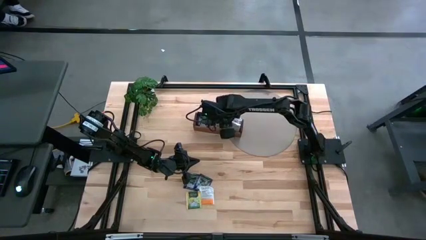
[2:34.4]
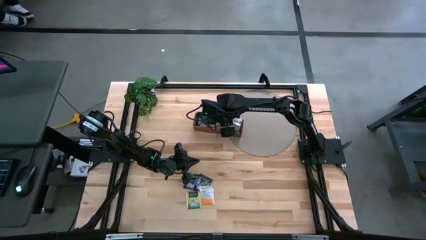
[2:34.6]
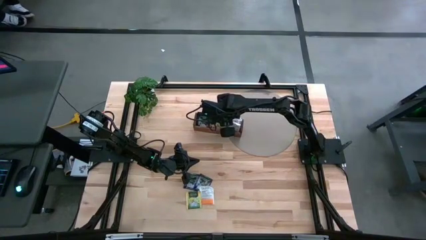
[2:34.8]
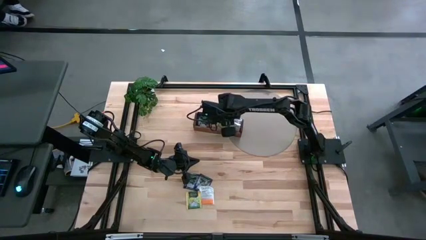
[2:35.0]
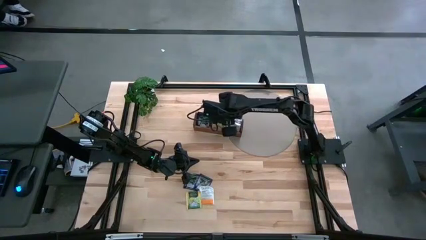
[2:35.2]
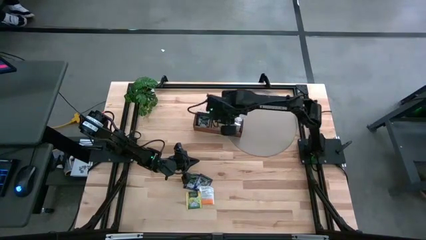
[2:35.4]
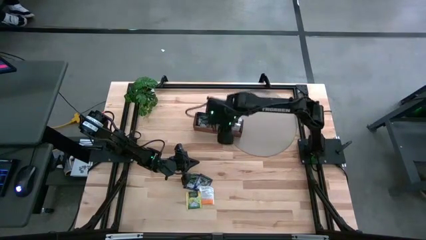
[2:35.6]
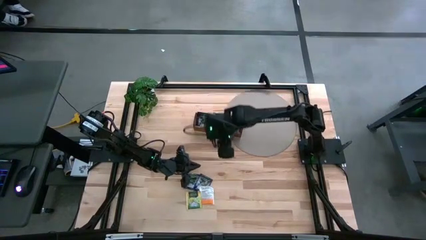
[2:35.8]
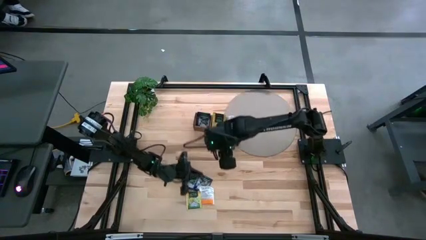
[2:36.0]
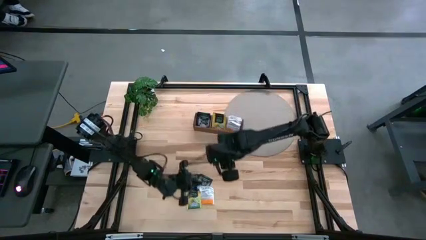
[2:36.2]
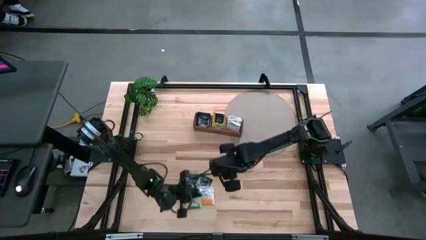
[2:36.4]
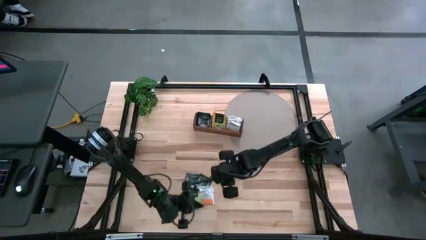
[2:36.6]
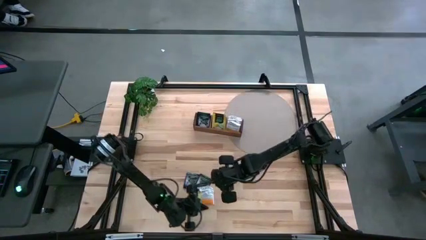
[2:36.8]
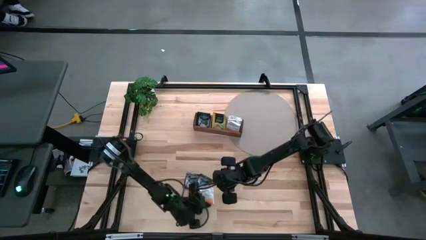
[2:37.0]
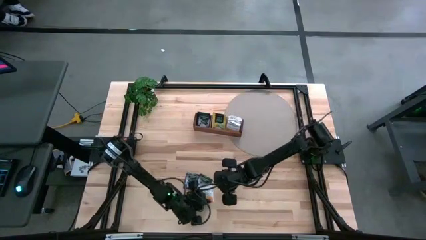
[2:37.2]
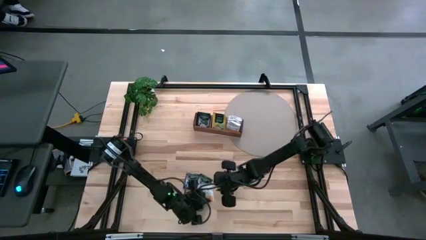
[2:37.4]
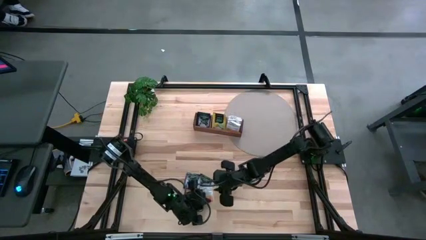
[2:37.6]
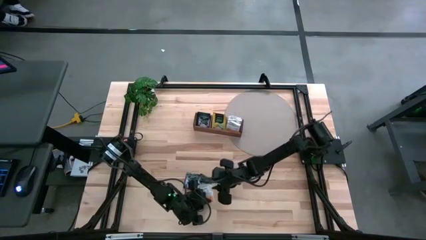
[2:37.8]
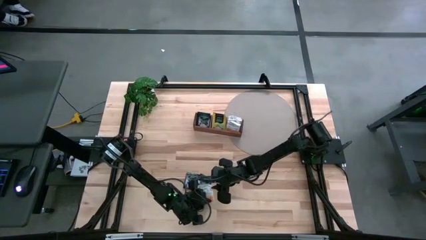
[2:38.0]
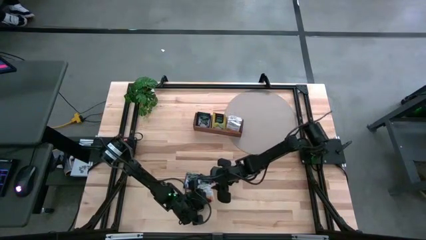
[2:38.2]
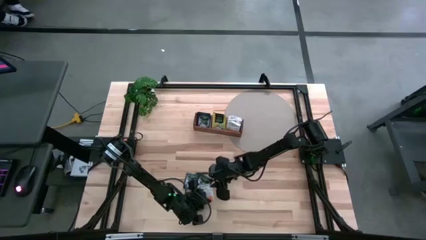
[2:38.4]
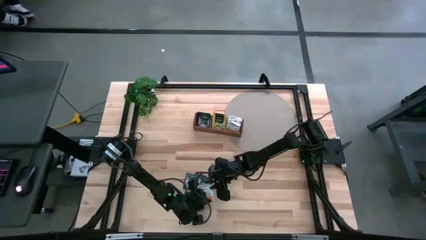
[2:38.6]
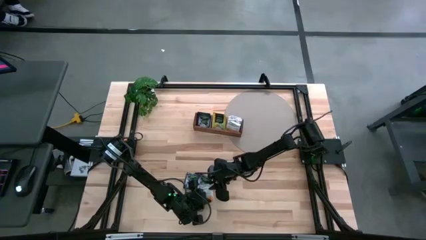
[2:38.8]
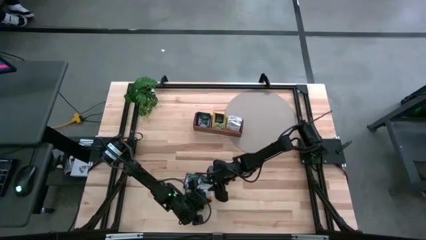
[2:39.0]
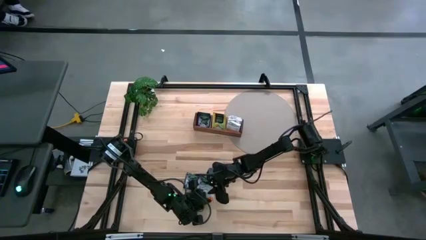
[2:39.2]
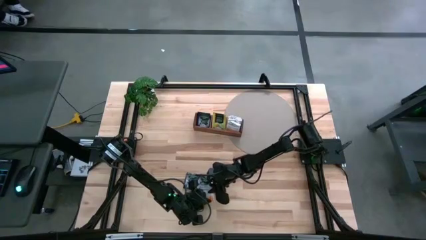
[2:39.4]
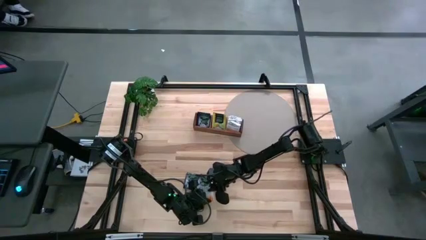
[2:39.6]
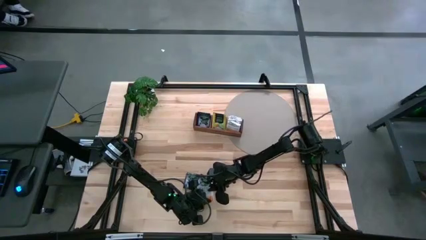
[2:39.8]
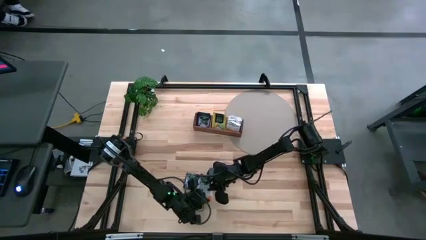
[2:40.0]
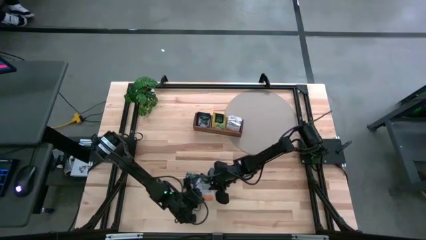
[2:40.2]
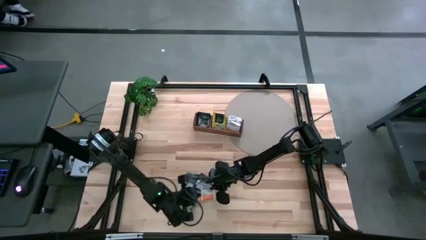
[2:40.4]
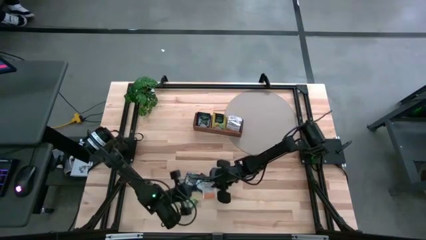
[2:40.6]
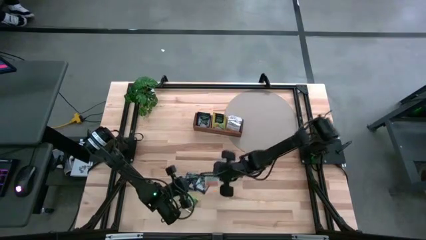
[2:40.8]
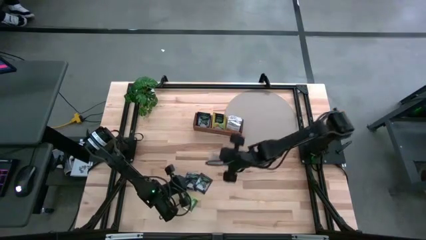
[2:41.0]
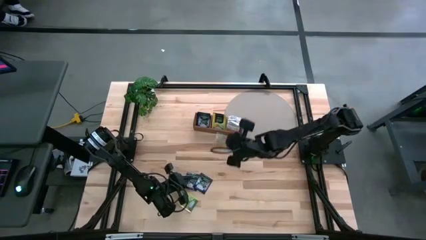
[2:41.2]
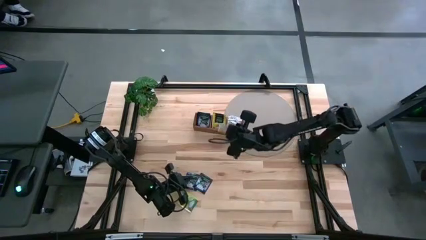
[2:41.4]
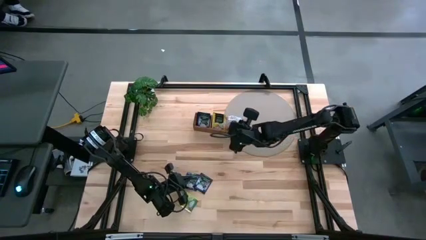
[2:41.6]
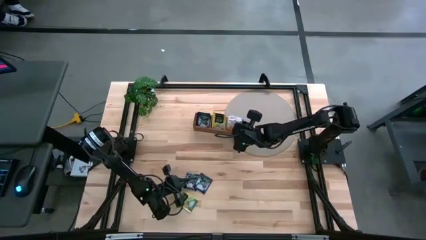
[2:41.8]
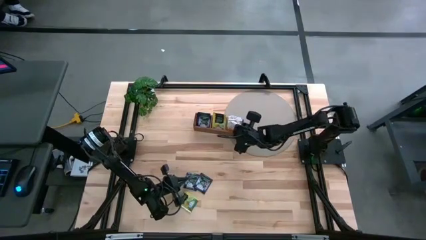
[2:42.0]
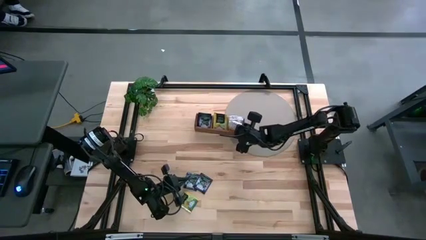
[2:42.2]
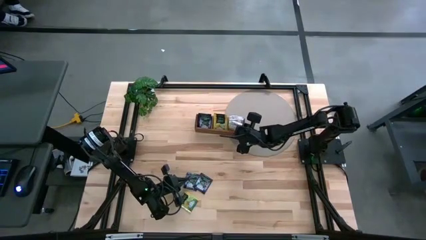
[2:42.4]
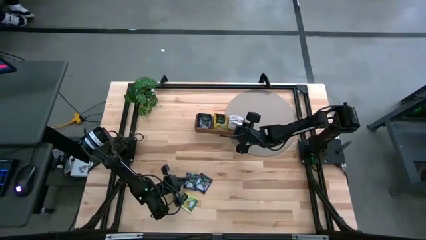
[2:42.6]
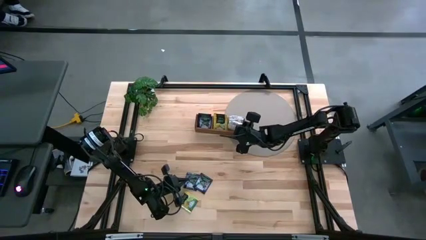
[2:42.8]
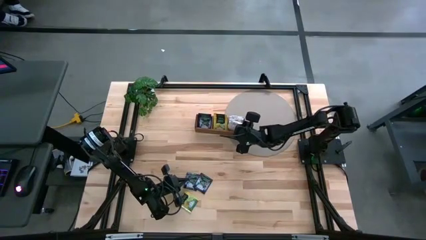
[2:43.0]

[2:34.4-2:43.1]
Task: Pick & Place Tea
Put the white tea bag into the right section of the wooden organizer

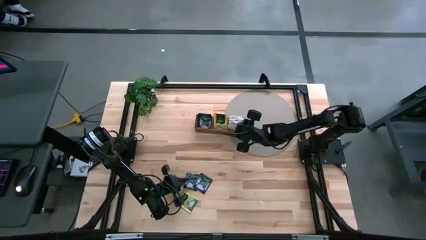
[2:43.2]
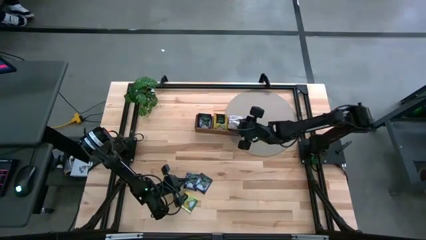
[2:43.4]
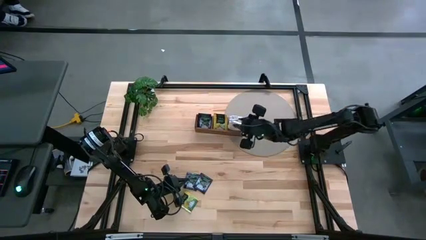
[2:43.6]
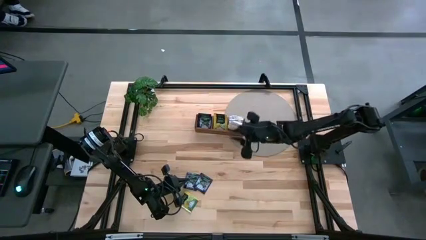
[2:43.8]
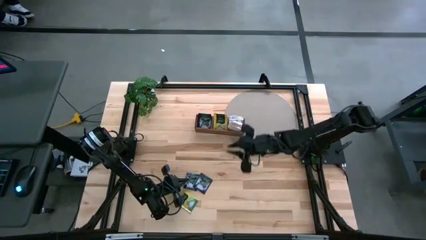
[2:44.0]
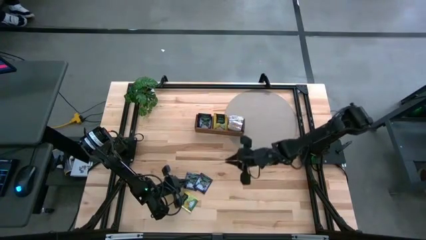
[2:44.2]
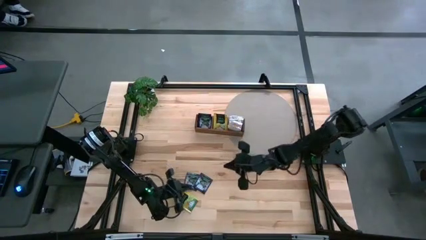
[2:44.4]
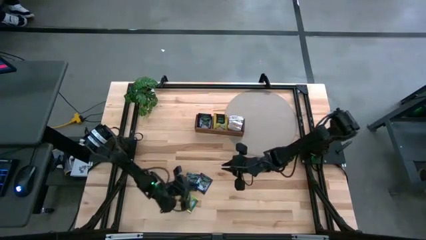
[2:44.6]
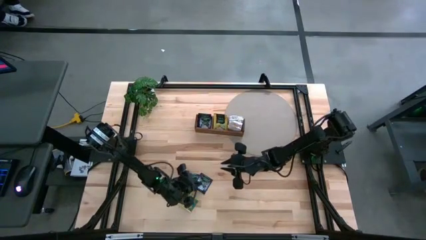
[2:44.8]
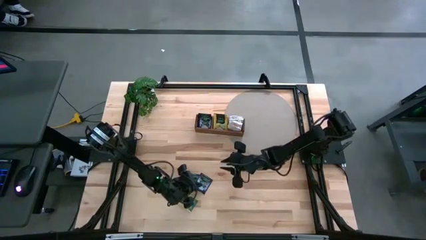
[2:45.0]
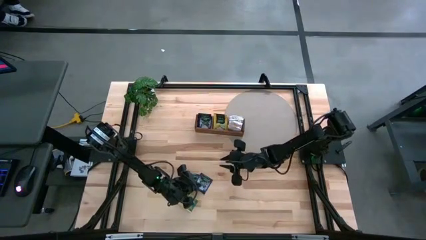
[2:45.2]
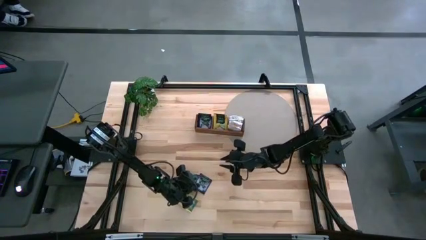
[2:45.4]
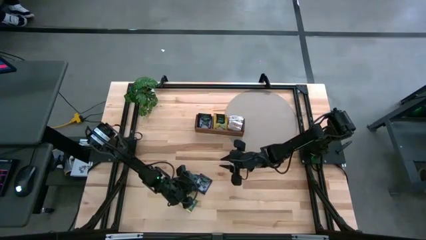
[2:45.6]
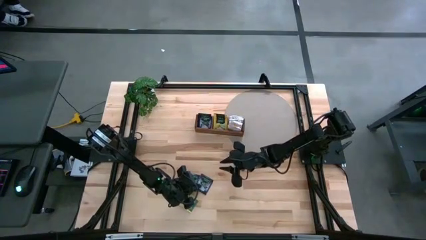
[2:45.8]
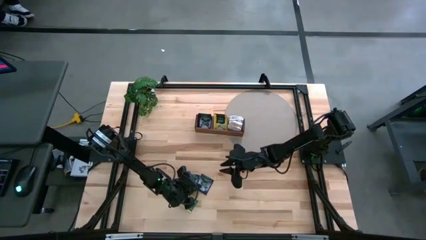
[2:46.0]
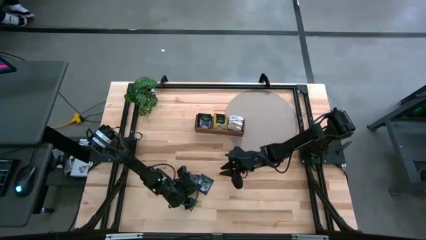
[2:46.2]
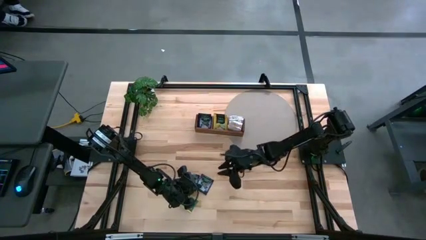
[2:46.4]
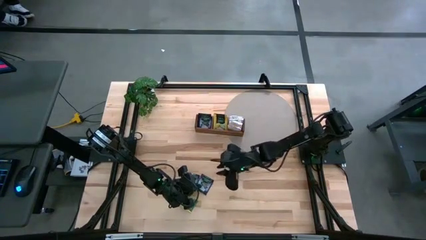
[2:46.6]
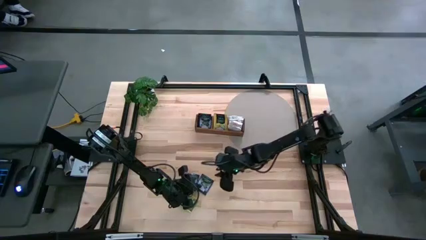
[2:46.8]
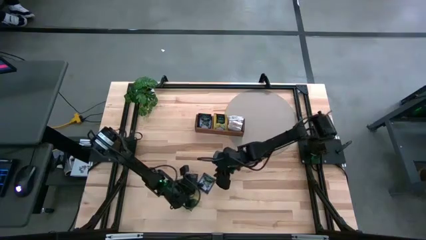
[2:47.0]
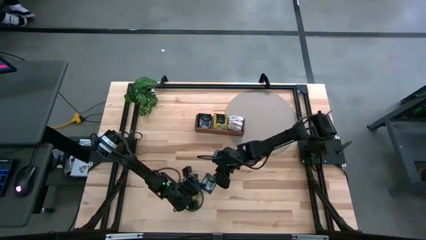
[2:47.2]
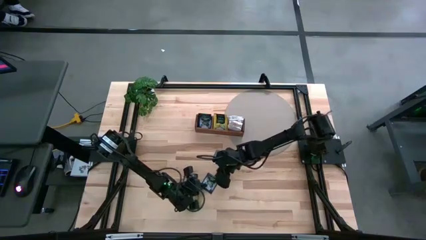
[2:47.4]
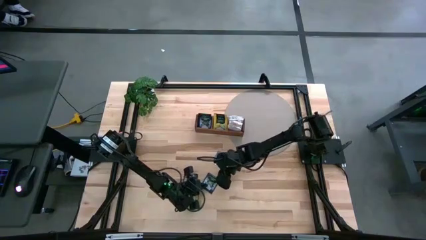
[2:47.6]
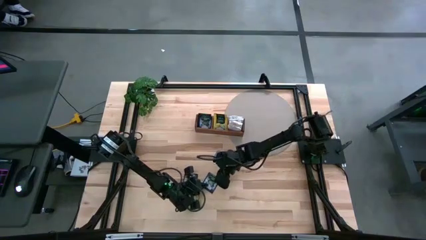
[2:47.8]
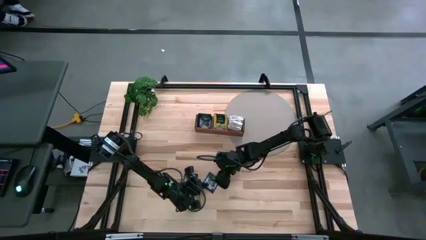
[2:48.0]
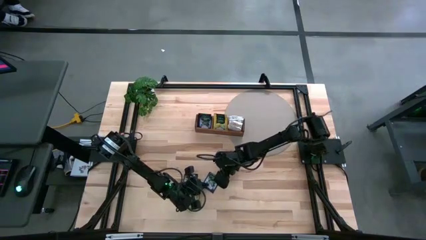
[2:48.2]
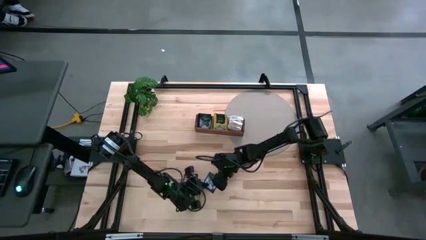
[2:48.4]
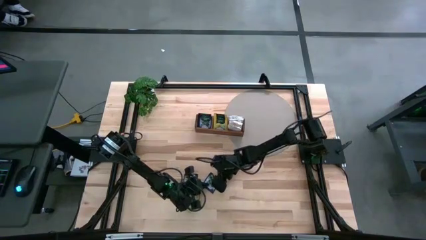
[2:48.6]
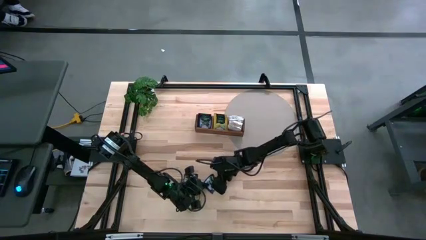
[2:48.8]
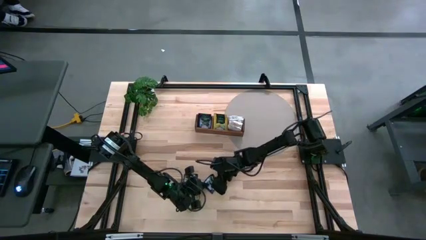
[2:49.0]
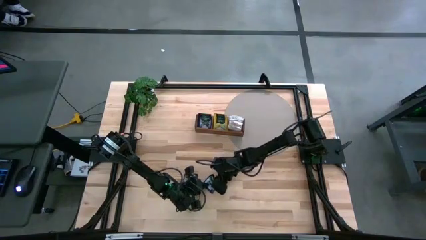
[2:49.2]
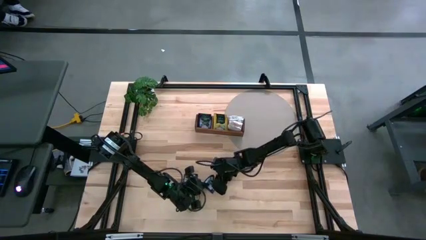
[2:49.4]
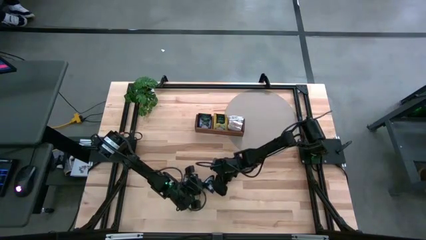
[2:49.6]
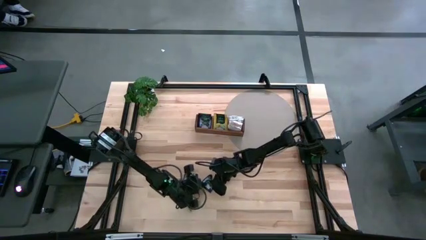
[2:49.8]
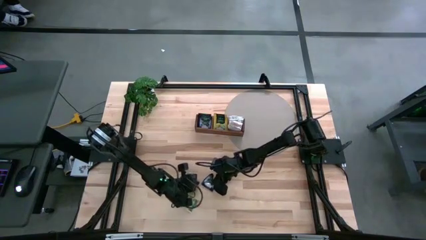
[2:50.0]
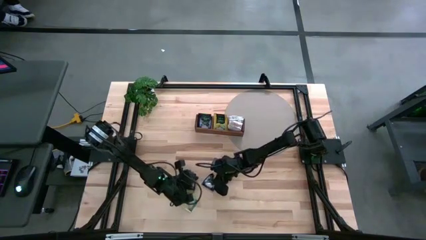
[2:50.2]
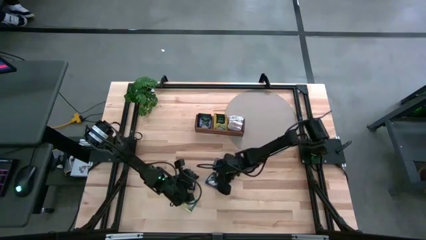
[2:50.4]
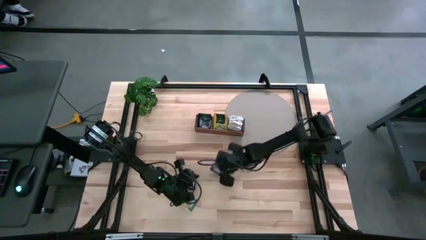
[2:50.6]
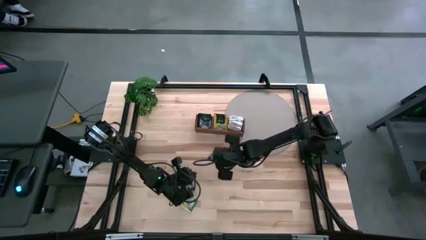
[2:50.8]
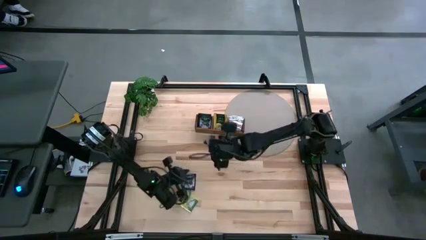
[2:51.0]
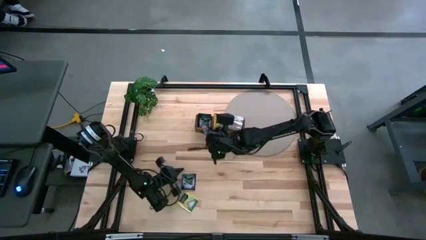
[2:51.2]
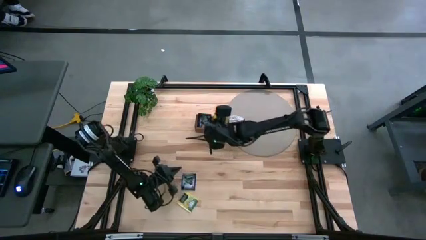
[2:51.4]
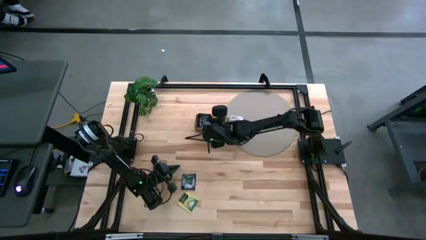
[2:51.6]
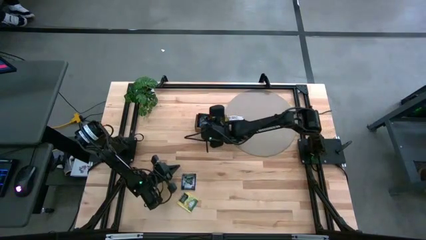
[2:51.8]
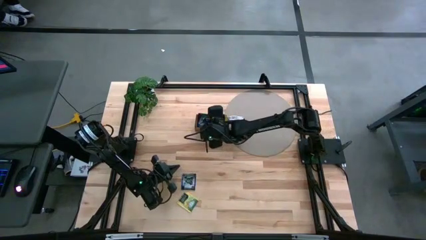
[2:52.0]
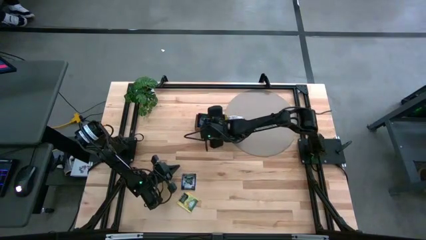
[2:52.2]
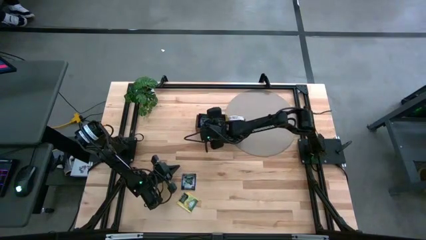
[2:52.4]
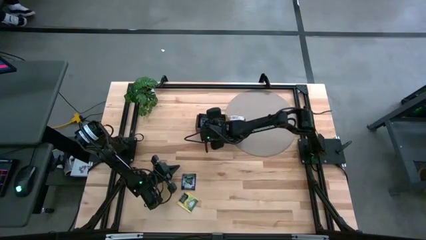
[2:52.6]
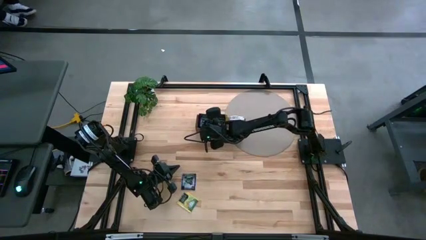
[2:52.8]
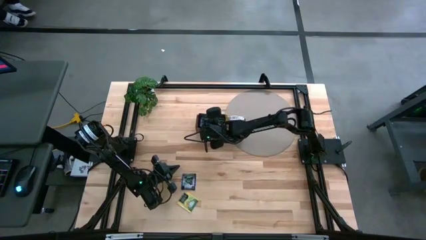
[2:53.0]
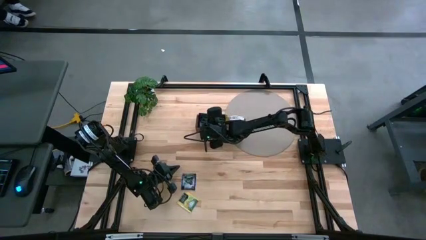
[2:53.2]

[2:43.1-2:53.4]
Put the violet tea bag into the left section of the wooden organizer
